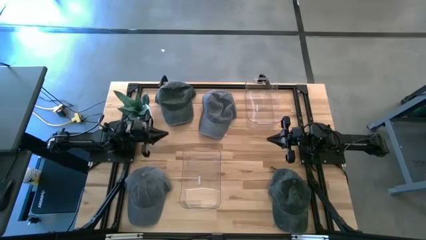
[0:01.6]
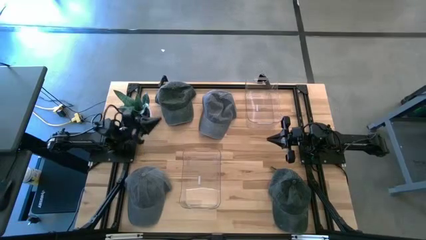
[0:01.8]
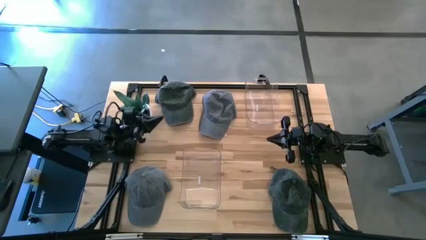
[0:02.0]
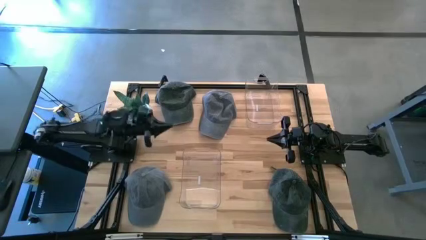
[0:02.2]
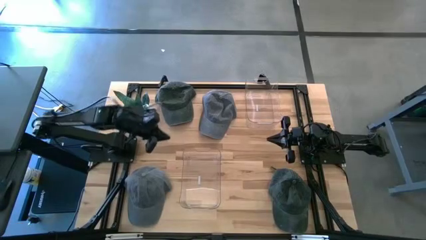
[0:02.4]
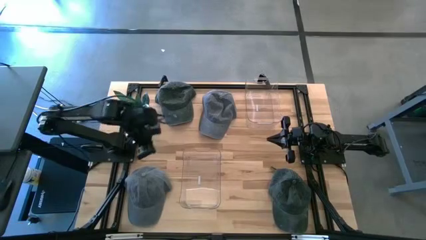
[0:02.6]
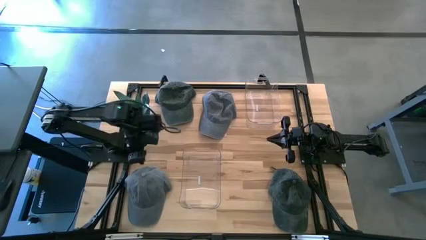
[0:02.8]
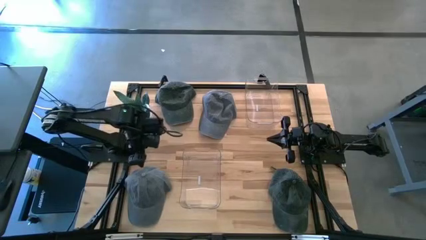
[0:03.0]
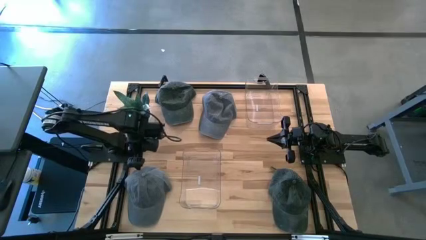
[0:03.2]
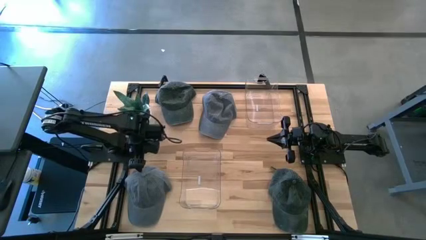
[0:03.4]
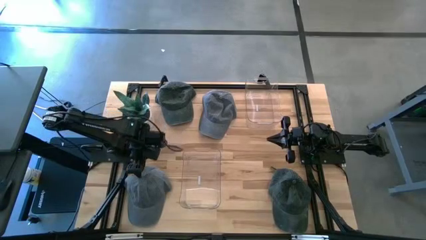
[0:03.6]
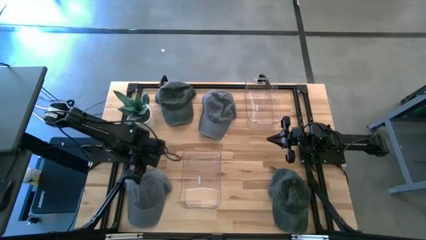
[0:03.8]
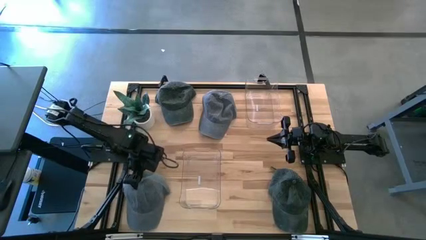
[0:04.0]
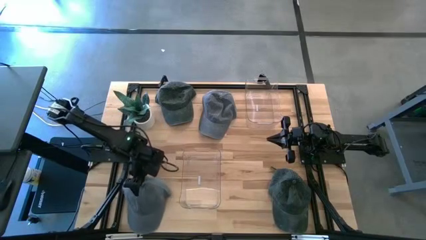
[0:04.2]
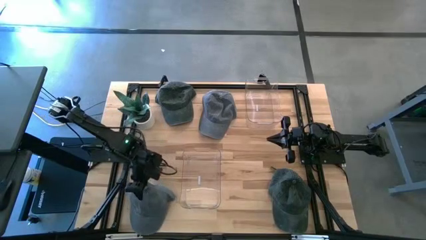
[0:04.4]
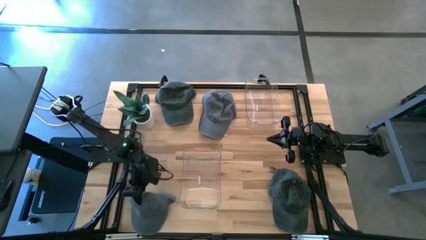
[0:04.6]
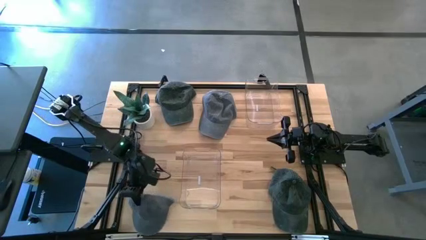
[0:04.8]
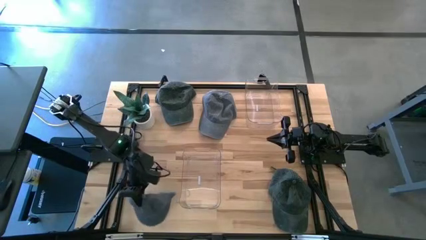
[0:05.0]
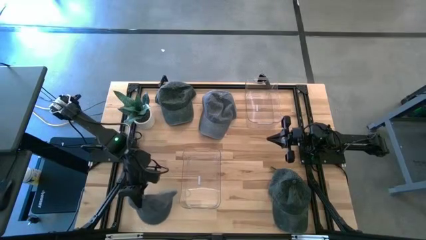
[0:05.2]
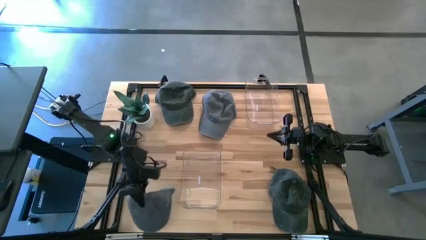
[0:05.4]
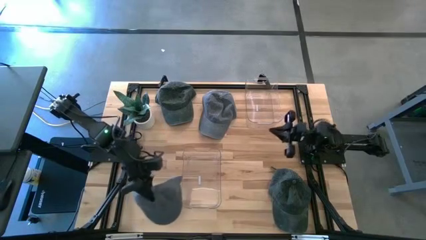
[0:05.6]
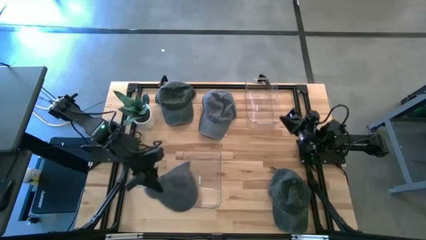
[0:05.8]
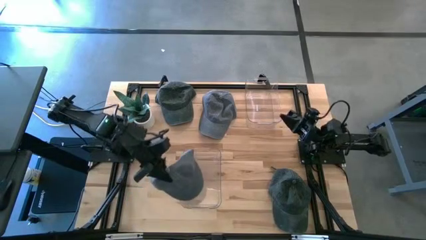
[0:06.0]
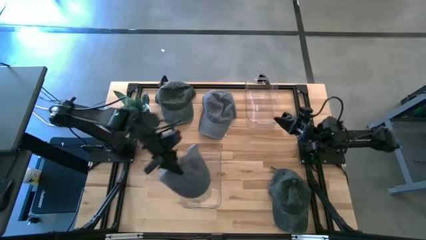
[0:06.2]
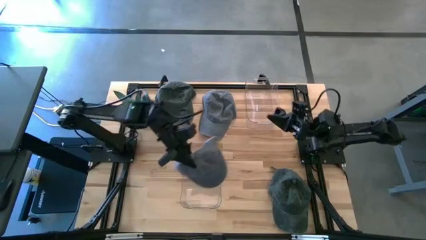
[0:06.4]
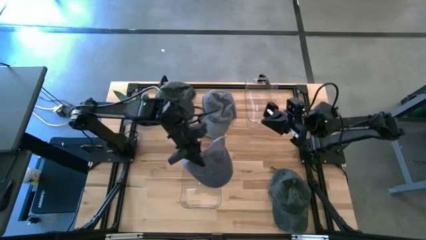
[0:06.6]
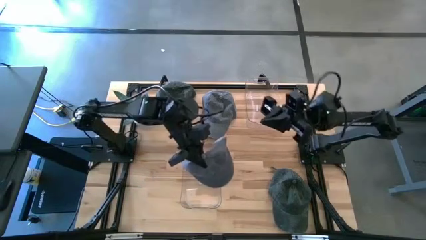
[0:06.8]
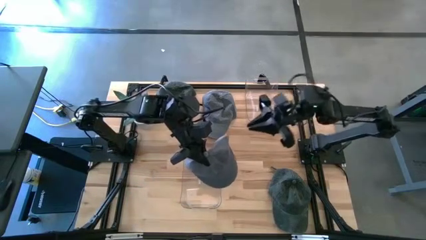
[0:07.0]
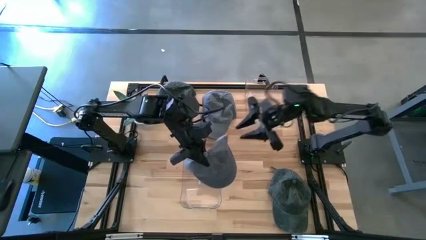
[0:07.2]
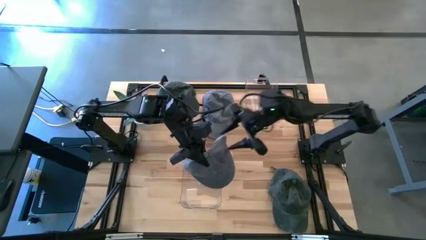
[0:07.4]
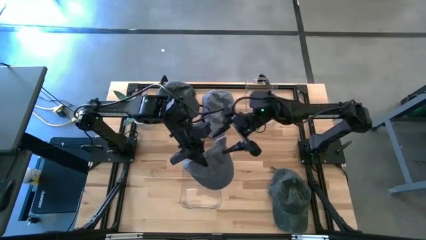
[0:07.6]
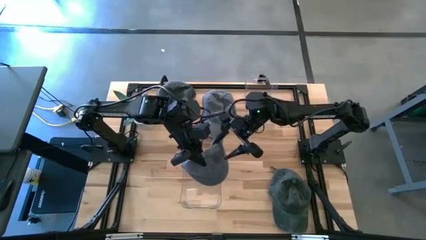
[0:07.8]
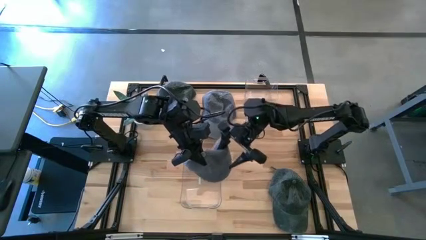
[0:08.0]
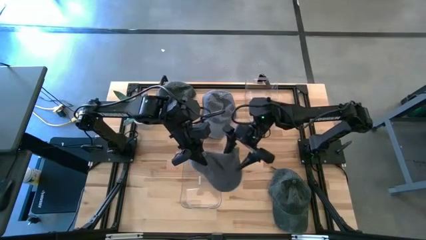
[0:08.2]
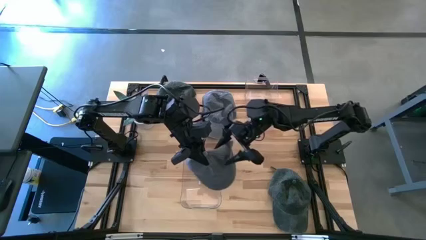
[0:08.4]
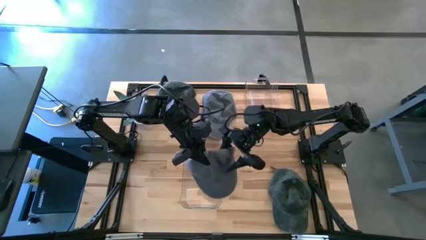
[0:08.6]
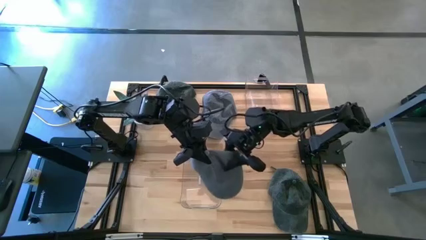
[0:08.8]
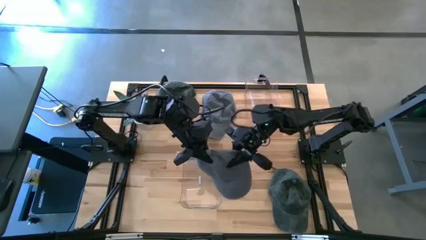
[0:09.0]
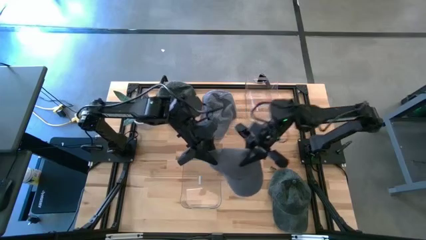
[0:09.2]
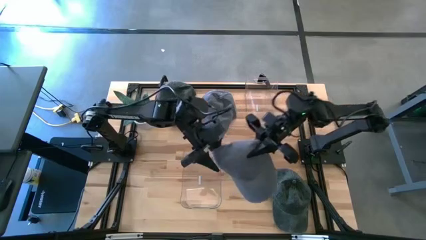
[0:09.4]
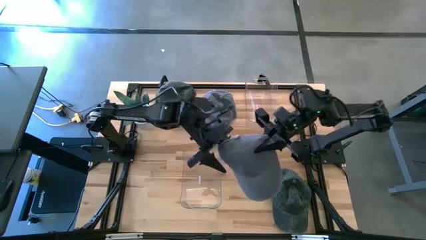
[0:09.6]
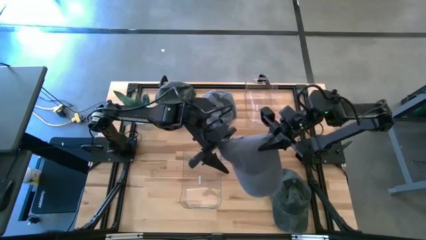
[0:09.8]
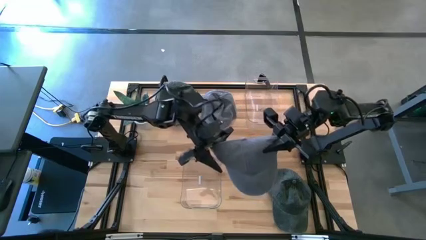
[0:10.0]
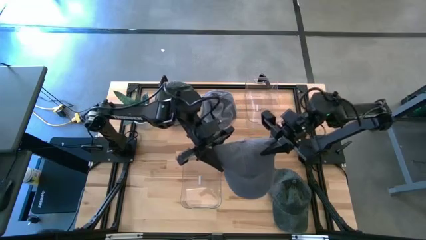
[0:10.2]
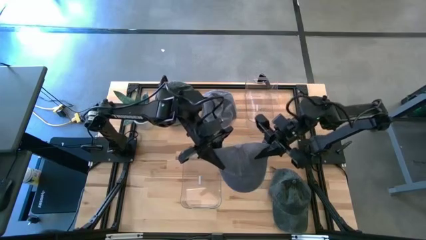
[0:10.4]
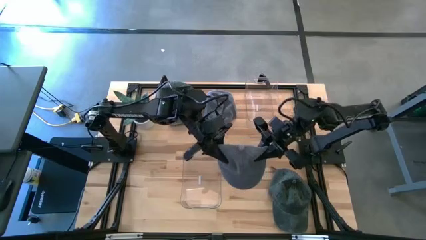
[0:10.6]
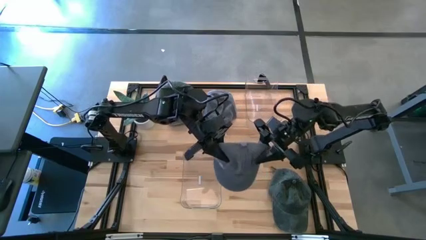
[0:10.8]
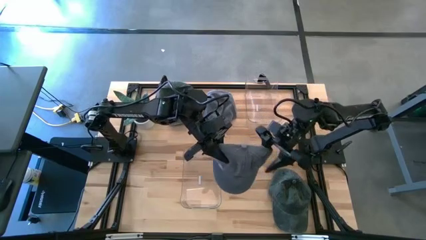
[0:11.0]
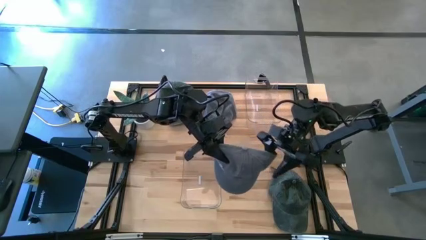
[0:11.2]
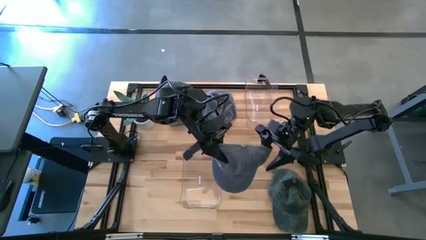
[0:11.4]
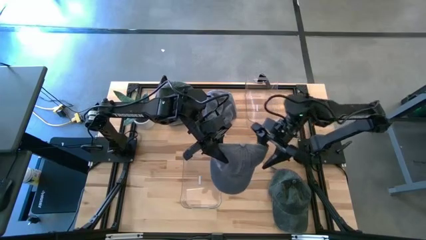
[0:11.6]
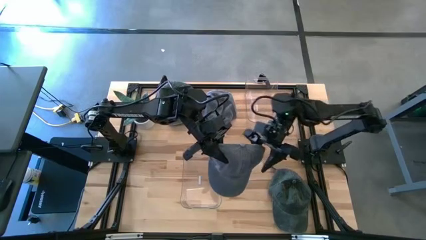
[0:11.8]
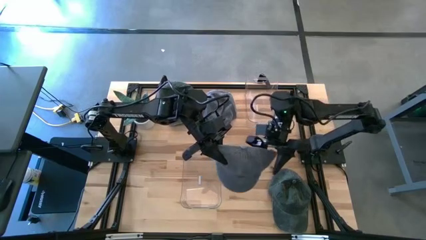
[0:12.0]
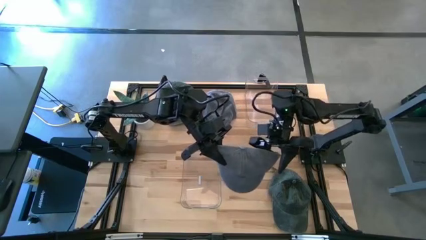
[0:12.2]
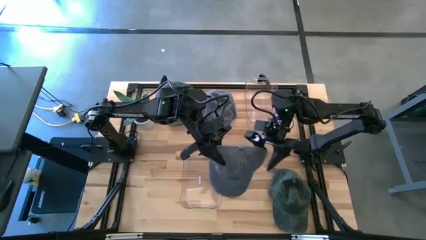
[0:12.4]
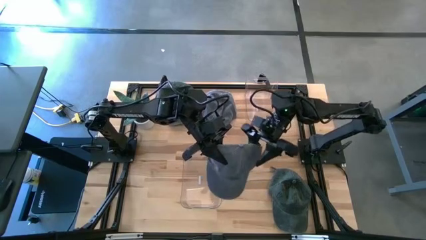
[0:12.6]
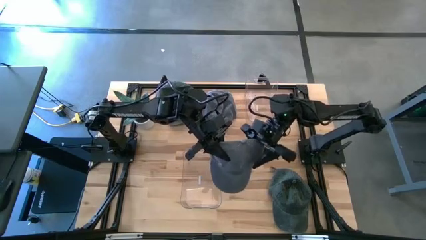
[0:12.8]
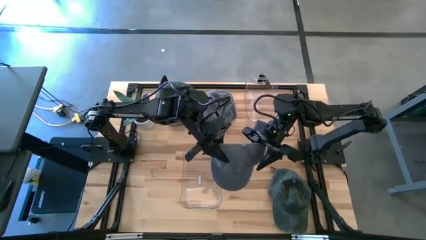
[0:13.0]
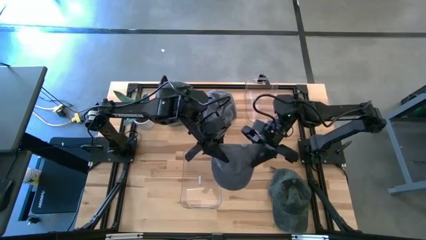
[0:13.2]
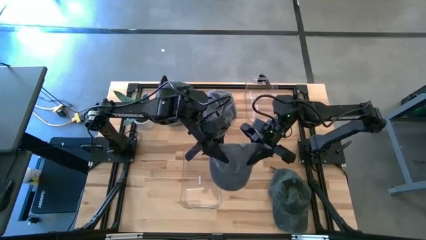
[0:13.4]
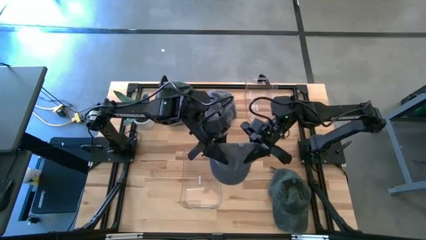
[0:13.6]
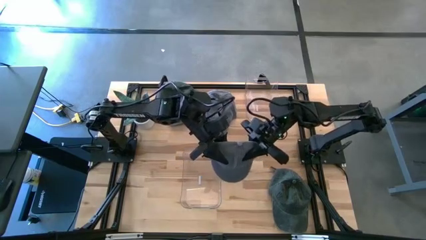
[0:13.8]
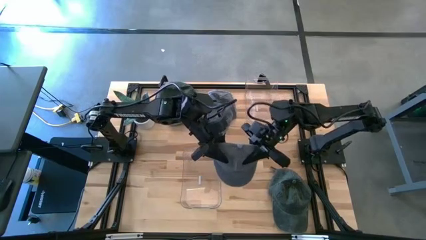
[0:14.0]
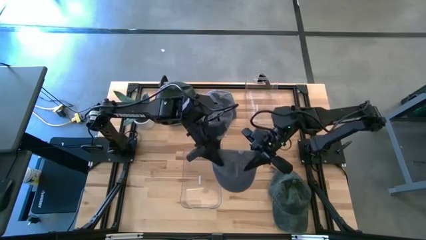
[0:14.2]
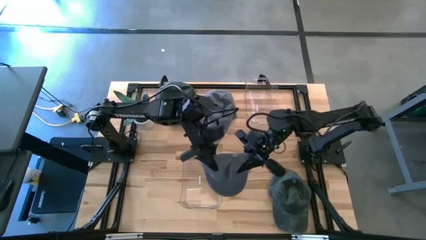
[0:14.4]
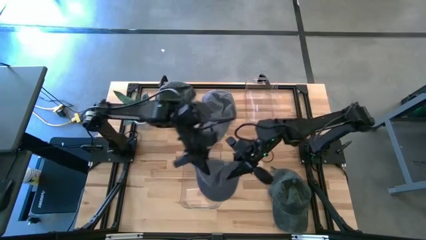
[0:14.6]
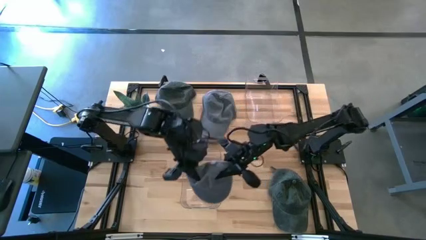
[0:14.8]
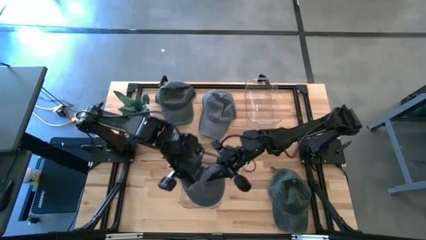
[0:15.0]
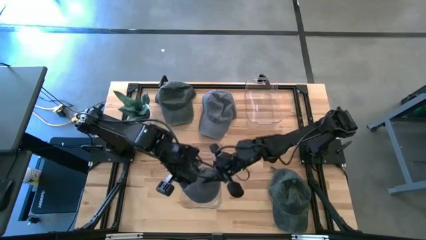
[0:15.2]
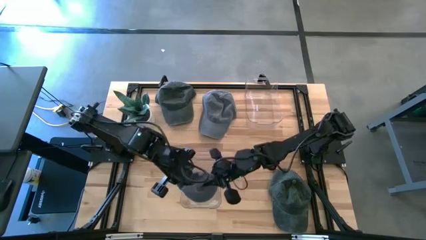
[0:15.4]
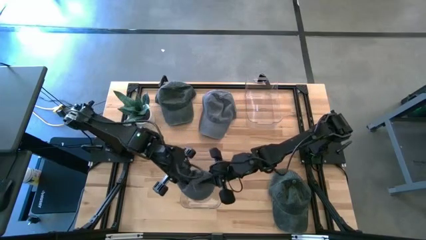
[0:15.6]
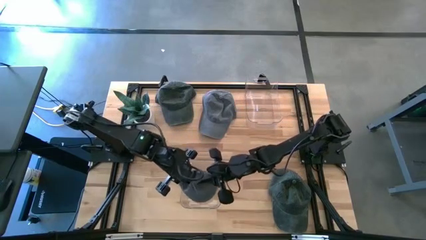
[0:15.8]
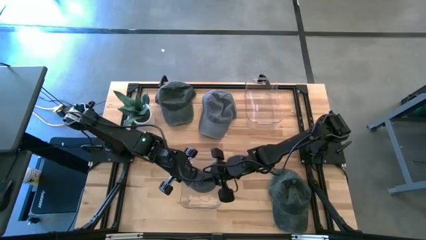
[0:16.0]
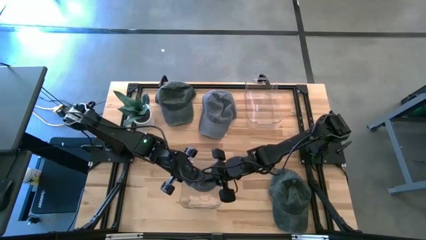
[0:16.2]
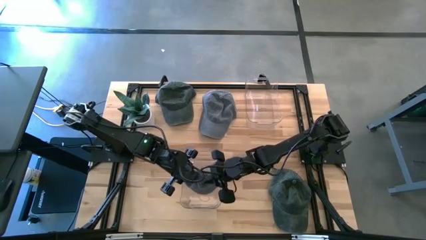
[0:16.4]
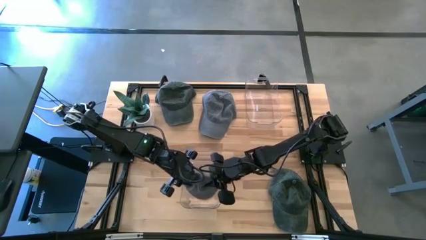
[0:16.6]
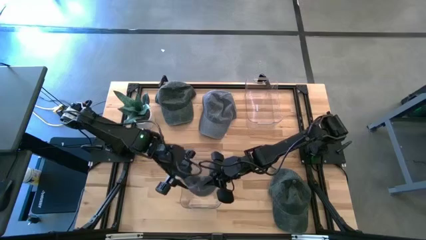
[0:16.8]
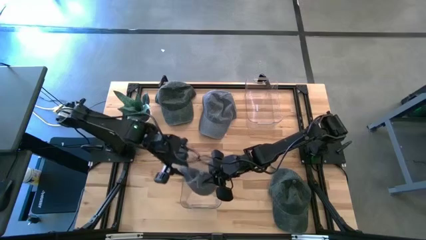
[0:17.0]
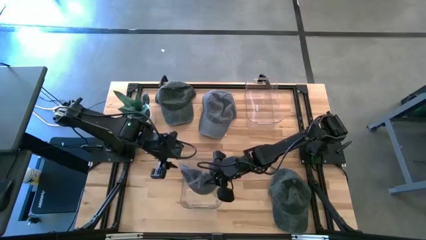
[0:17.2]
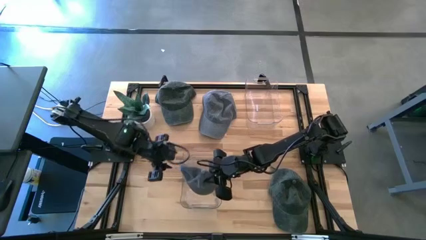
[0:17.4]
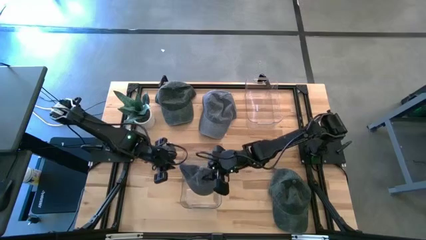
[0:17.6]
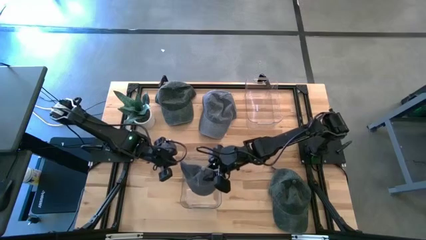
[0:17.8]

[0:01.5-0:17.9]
Task: Pick & Place hat
Put the bottom gray cap into the bottom transparent bin
